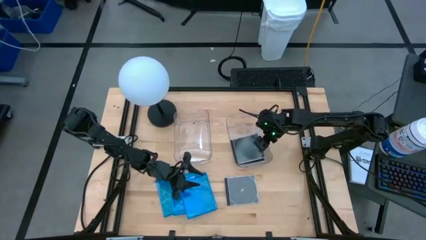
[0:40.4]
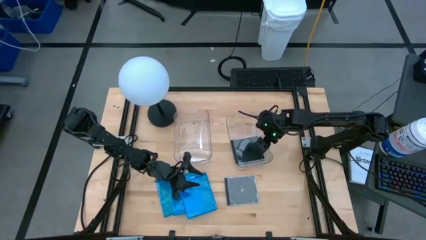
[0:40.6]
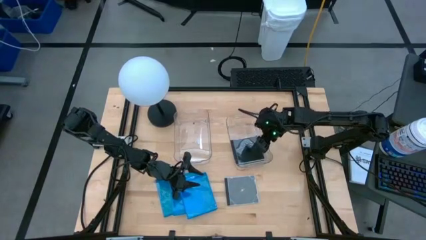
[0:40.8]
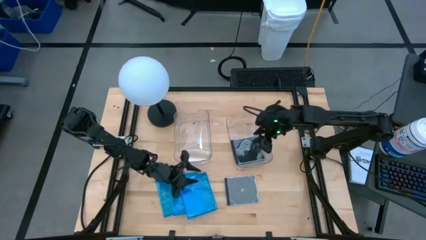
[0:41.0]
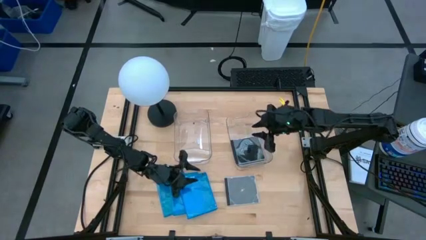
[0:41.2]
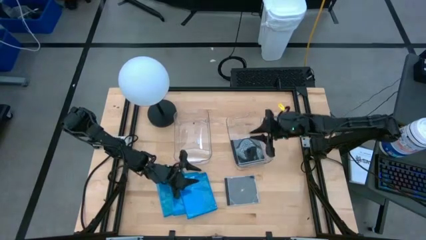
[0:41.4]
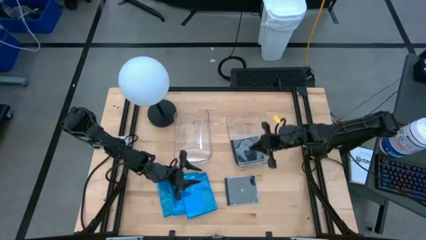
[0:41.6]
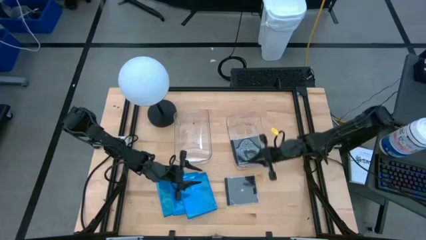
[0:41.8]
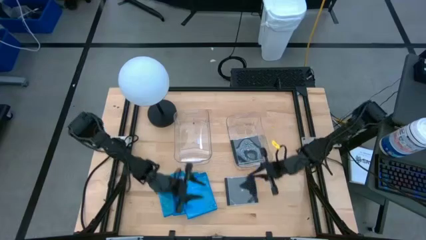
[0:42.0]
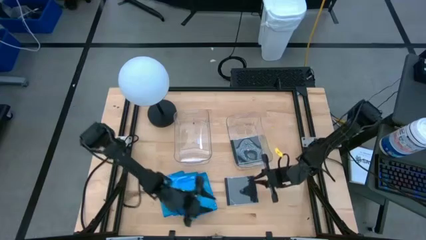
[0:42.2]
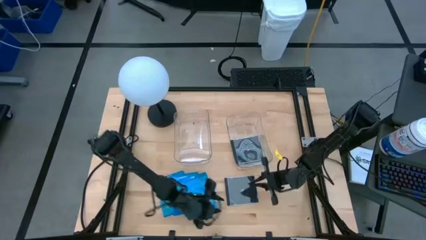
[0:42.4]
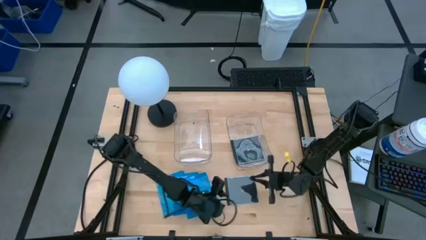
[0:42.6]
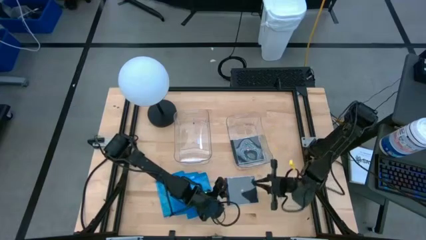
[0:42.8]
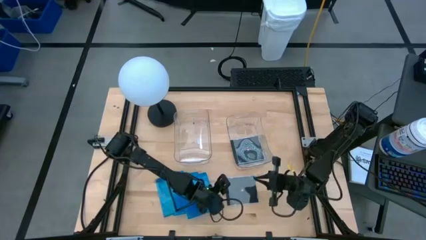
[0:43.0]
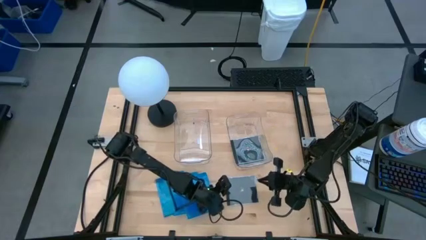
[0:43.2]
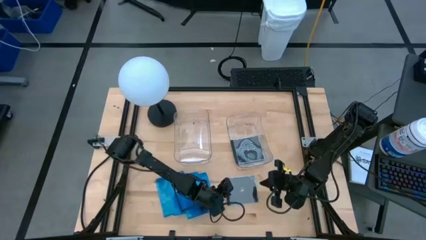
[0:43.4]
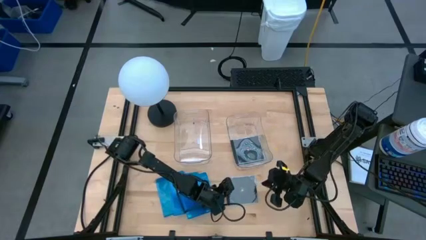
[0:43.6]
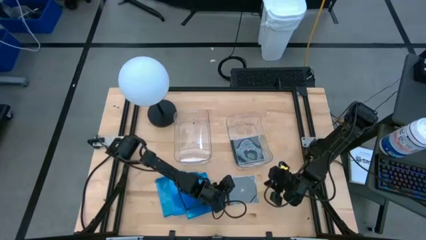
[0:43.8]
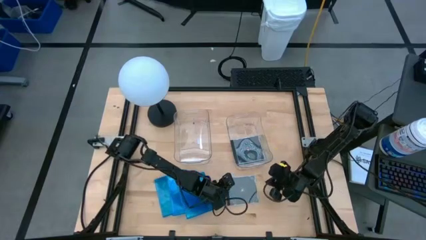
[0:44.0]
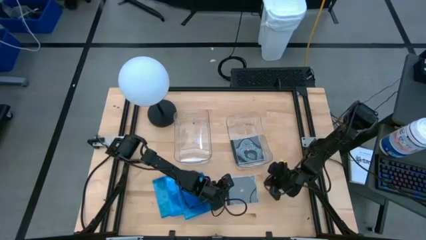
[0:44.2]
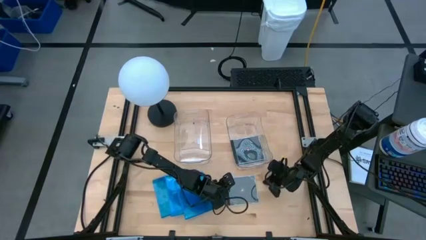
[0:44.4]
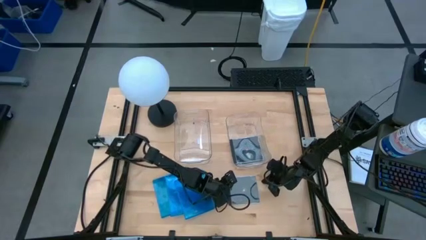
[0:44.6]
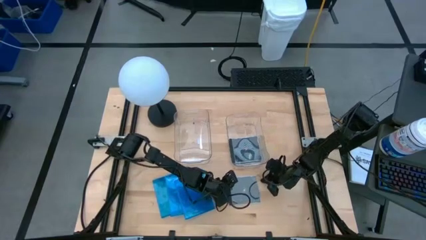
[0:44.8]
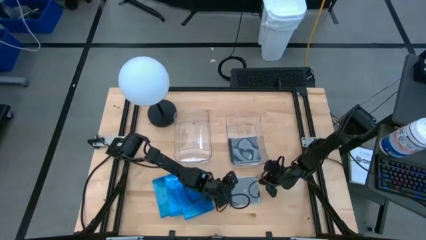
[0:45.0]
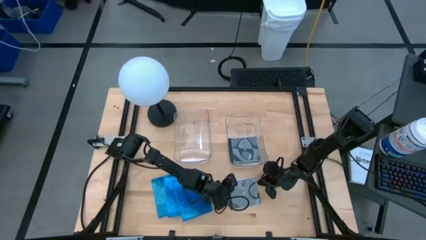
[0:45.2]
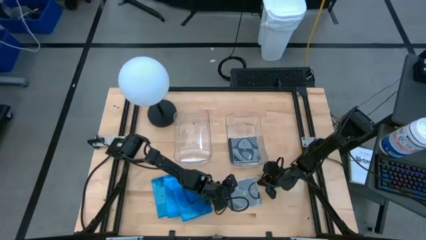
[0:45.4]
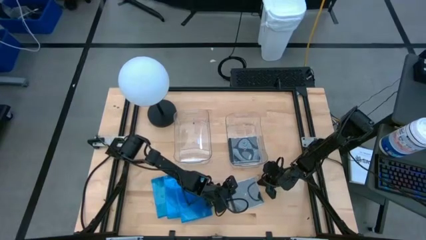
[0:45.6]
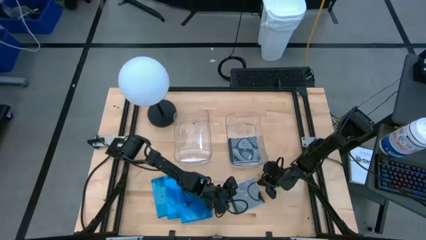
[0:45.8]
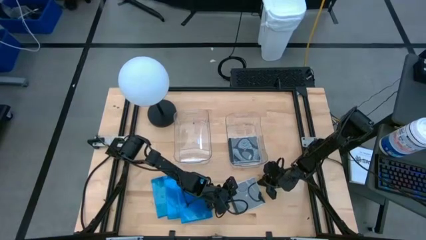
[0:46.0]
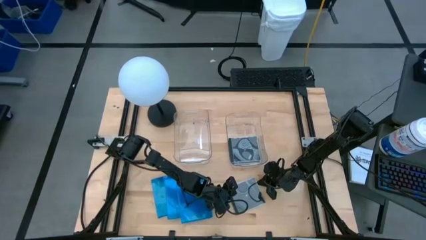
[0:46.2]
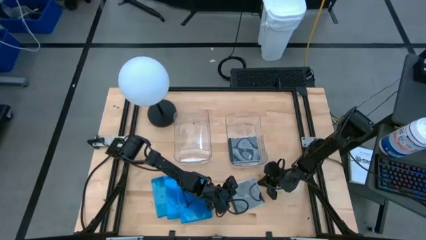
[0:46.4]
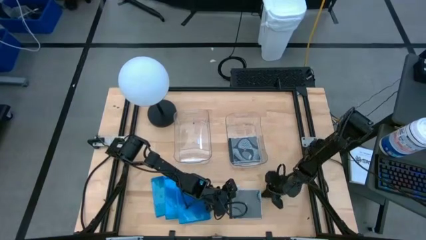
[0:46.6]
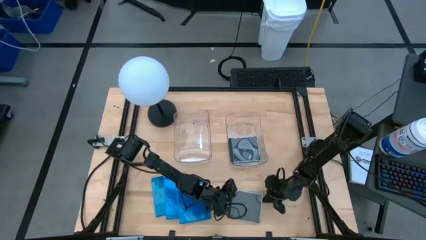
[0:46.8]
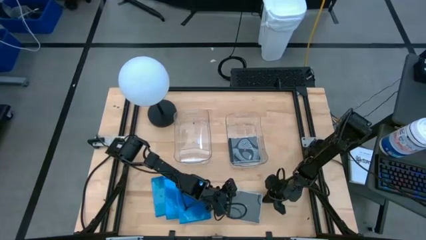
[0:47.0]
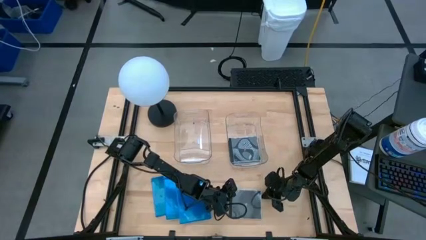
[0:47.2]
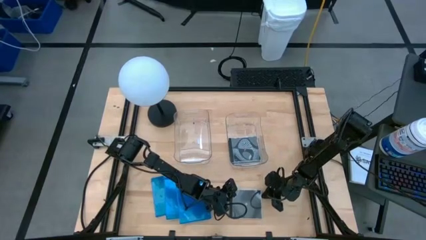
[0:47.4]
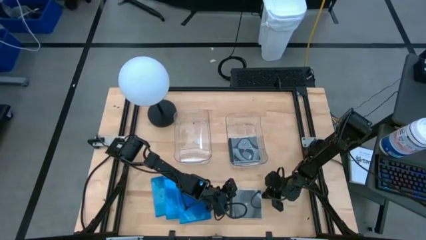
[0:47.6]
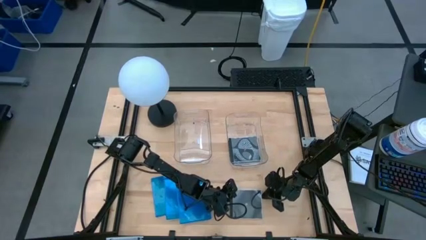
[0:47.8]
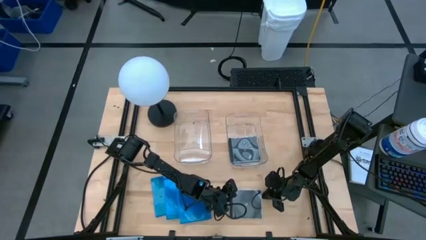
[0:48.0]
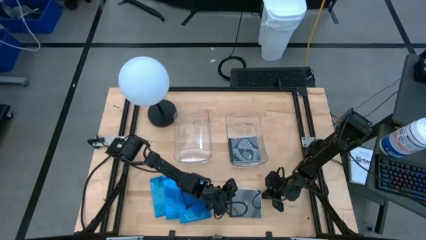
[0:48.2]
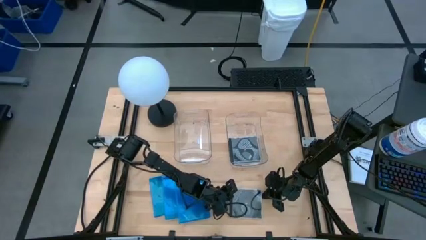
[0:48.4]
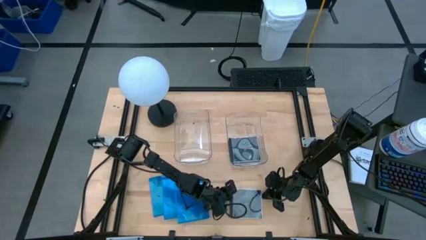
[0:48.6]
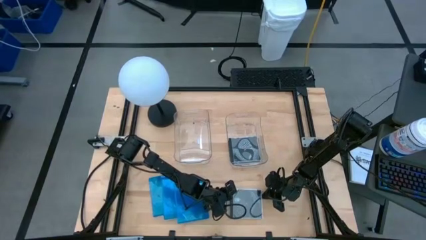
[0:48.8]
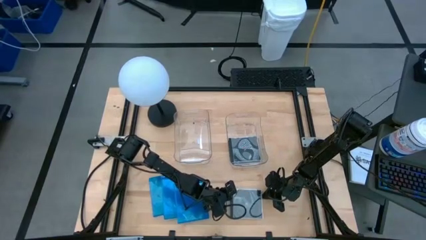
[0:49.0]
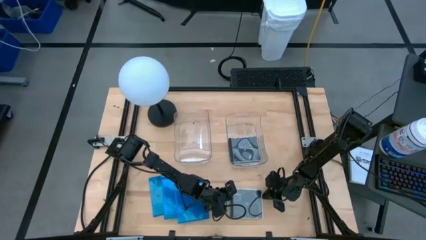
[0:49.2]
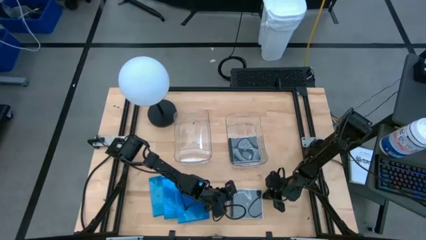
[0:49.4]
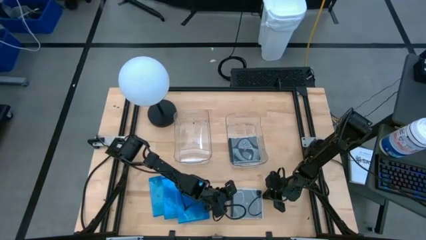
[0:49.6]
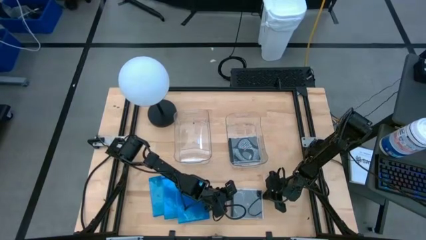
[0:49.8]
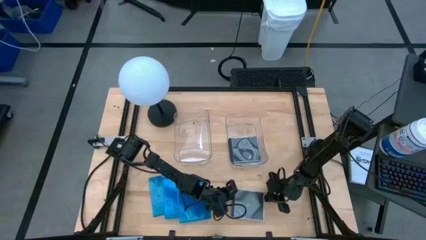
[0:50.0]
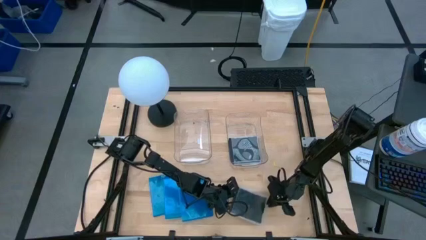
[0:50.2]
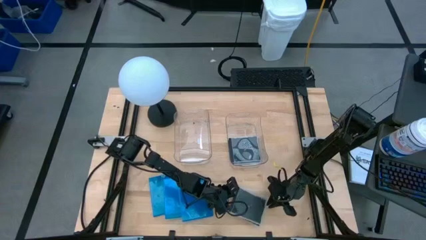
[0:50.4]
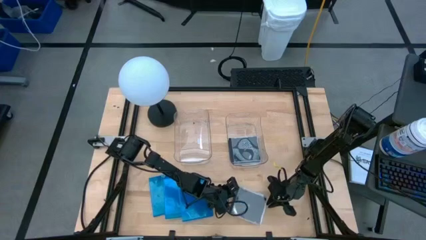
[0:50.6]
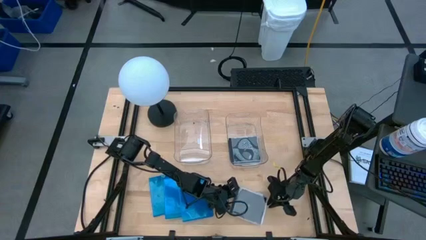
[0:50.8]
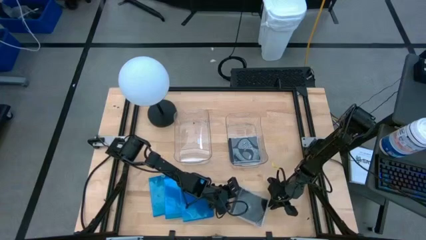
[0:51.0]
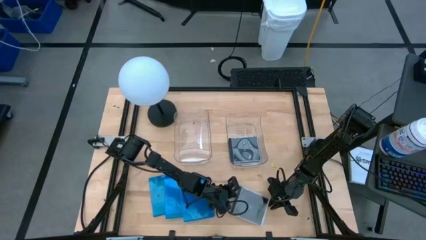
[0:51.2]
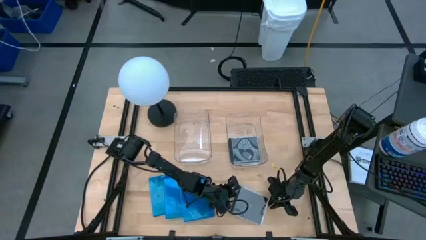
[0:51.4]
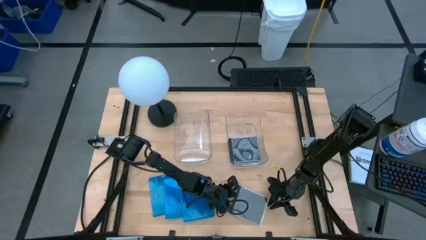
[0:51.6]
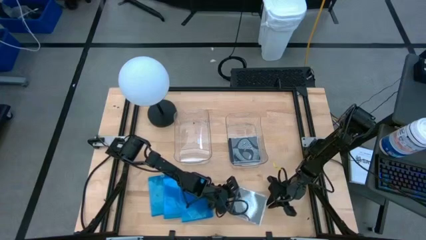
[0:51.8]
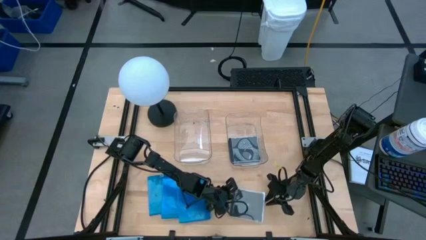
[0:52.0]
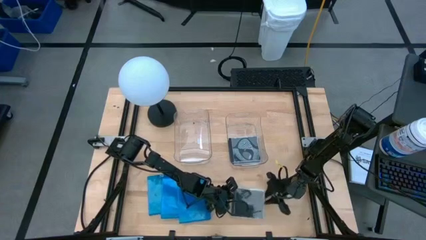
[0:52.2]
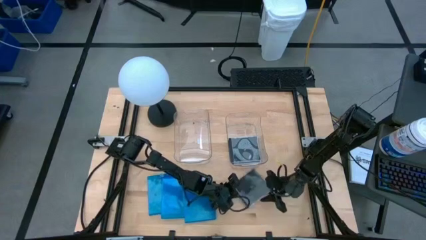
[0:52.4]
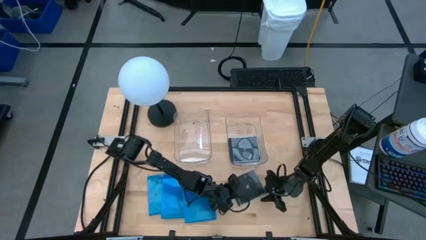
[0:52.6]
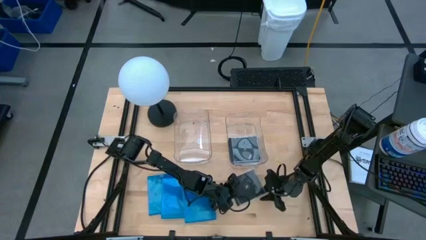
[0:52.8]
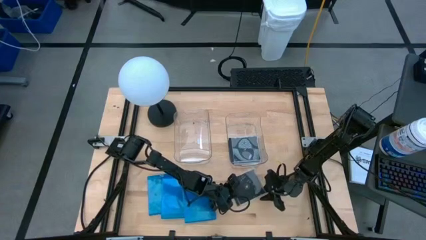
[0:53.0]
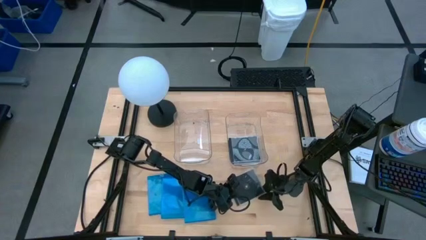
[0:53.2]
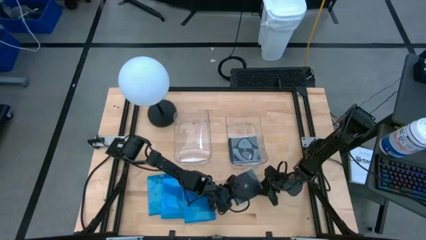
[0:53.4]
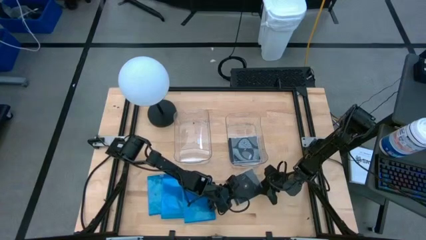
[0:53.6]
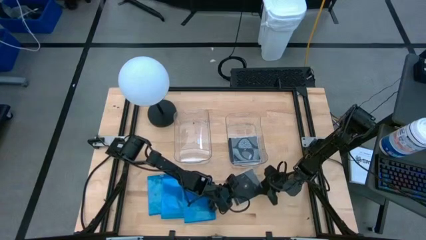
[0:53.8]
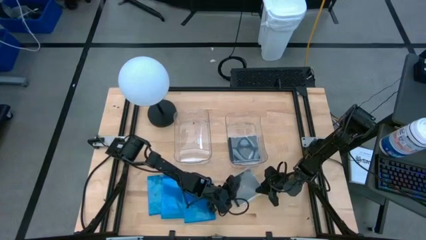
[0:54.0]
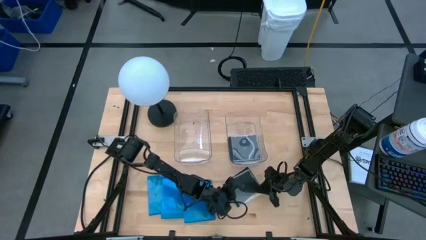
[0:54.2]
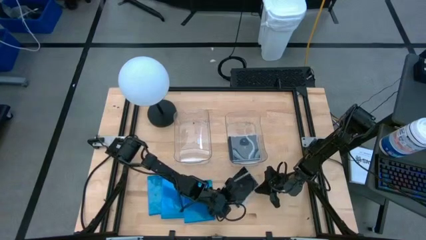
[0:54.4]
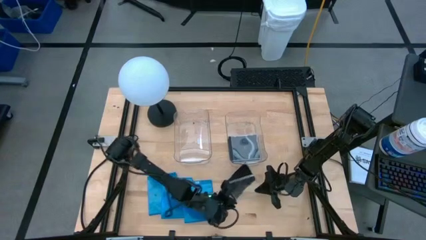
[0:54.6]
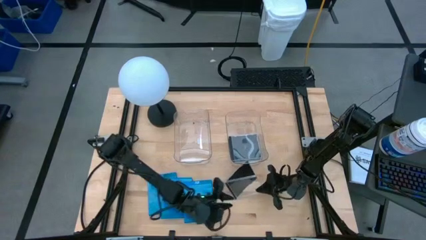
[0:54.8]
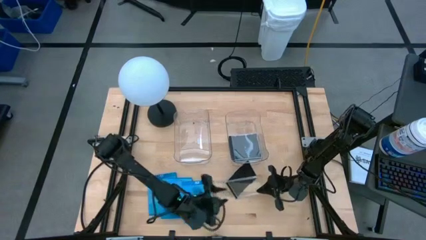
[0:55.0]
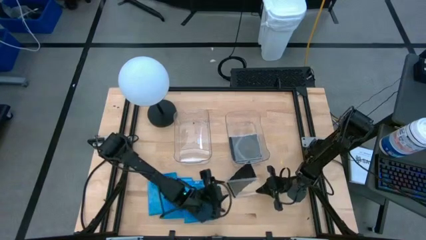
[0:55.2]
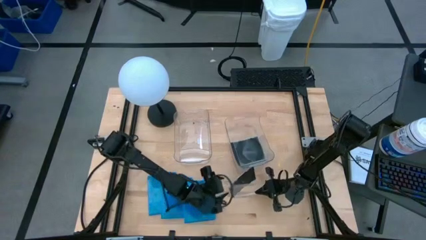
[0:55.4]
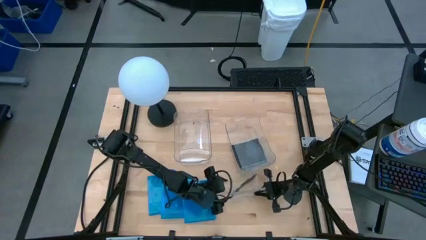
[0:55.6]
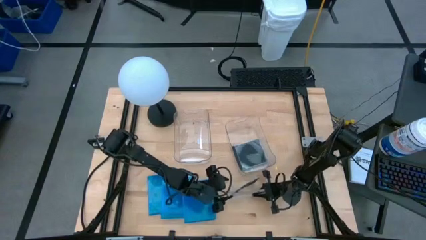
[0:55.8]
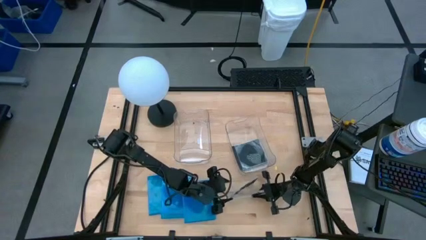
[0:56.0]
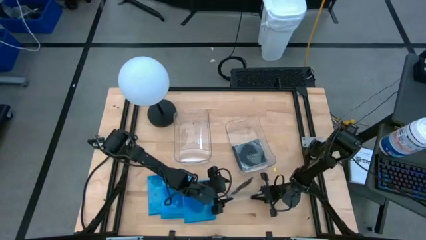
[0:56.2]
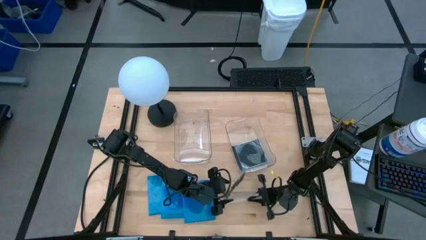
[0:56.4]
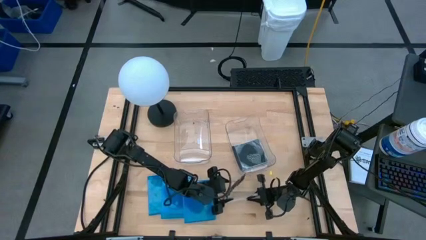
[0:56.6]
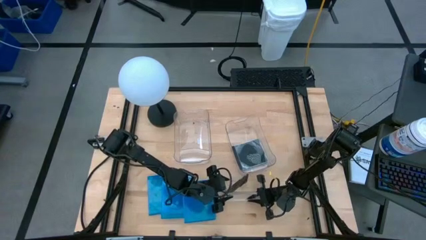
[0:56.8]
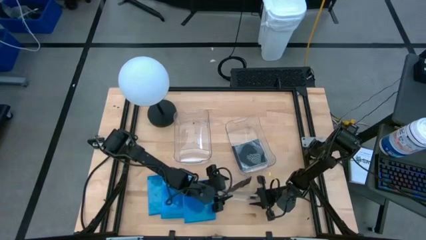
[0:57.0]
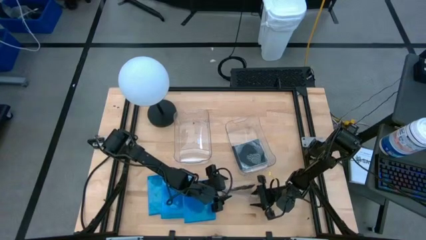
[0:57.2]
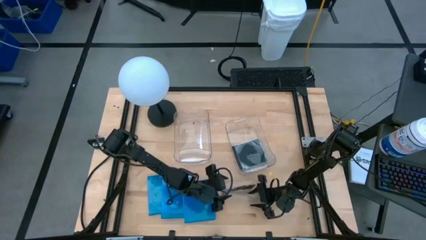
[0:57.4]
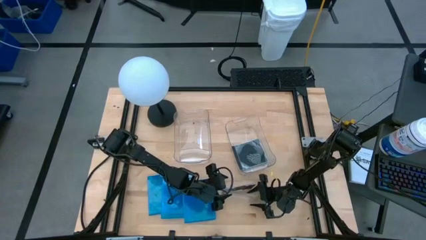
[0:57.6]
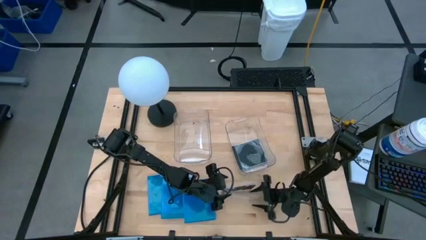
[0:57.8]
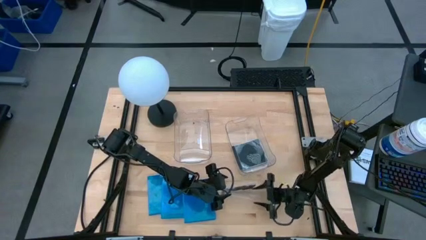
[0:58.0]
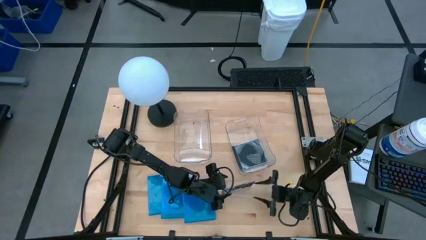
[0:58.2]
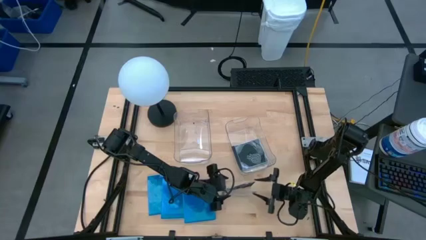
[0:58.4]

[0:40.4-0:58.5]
Task: Pick & place jewel cases by type
Put the black CD case into the right transparent bin
